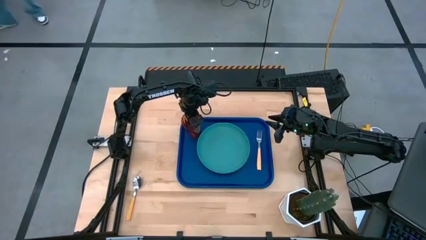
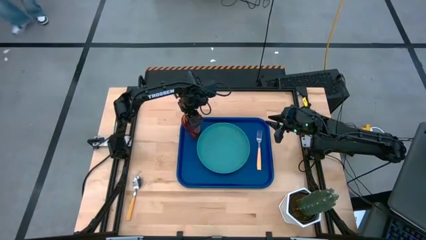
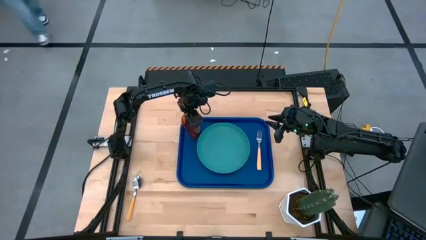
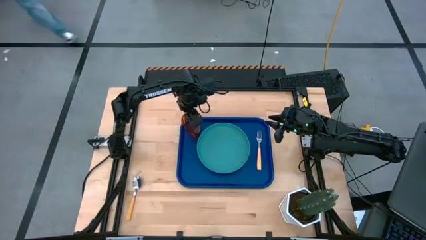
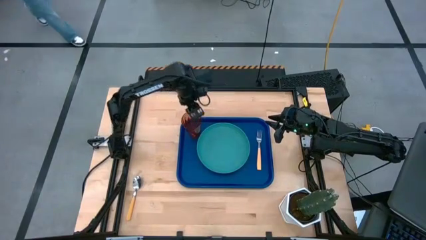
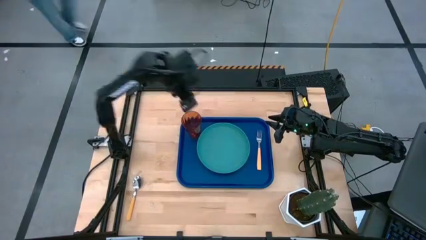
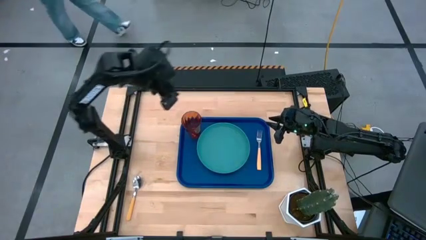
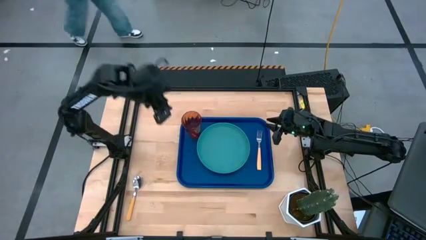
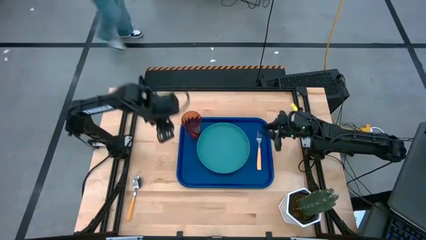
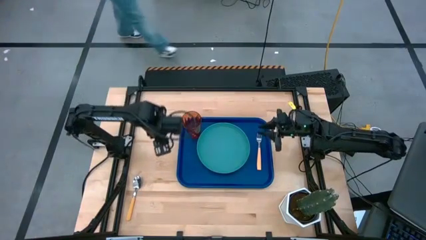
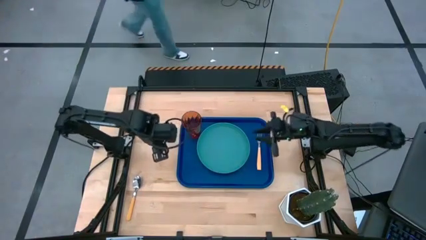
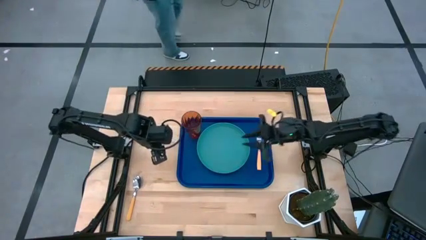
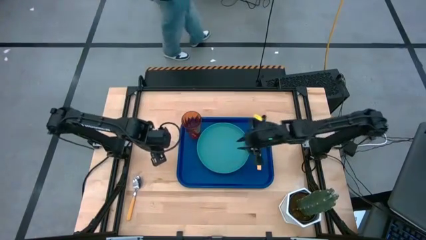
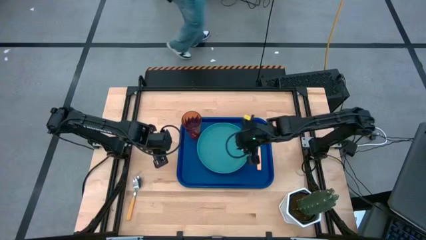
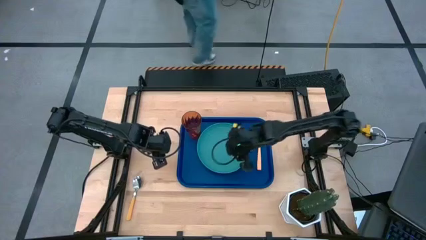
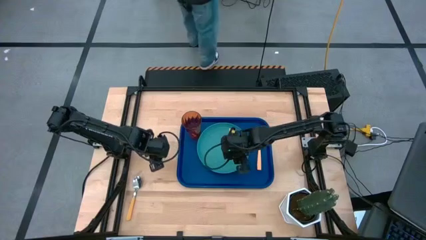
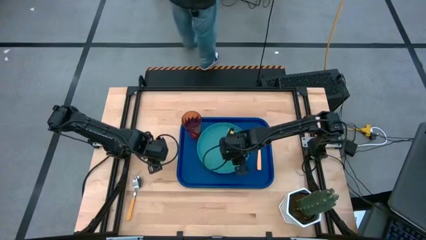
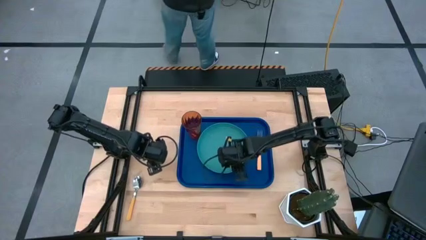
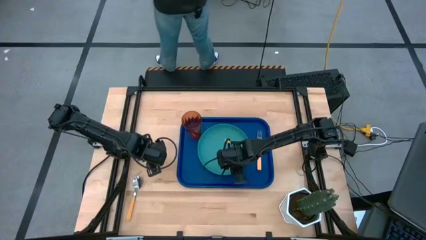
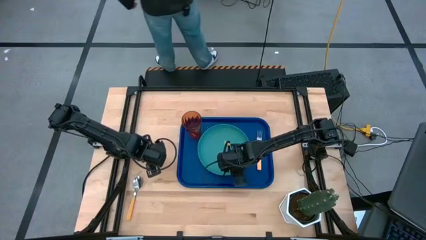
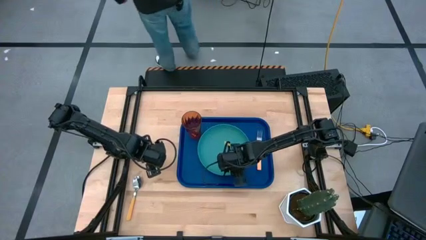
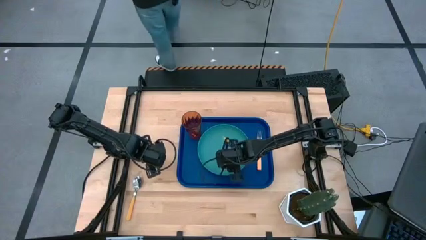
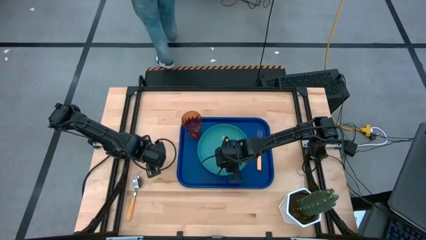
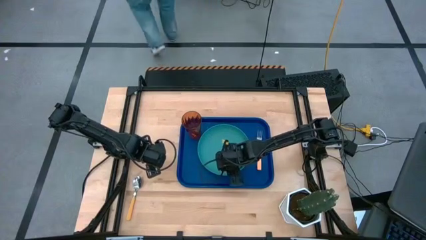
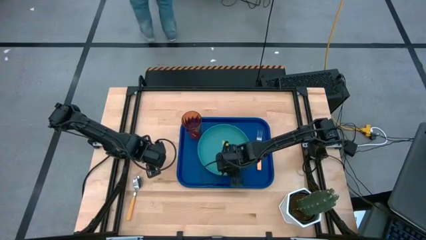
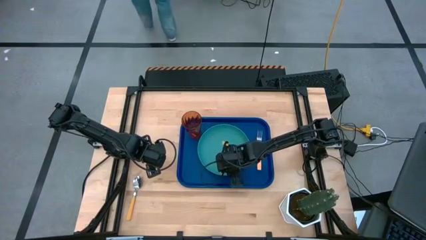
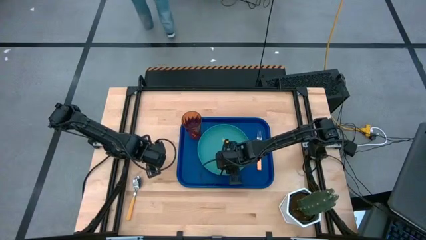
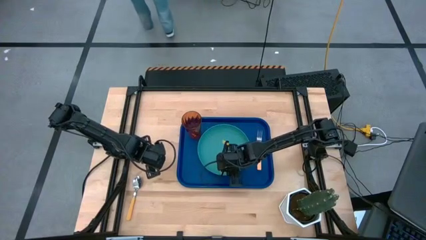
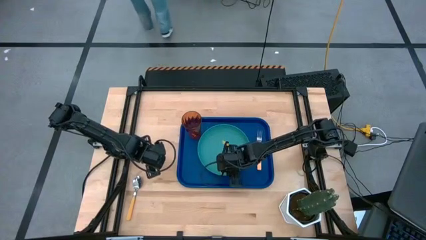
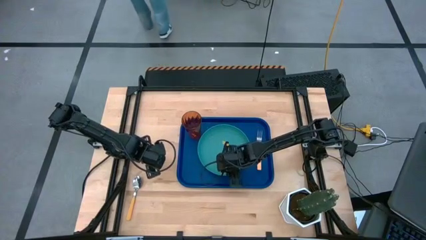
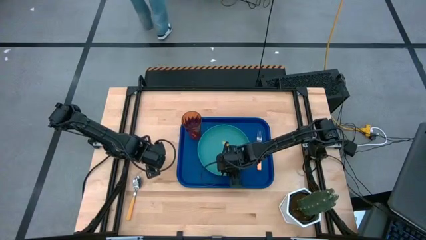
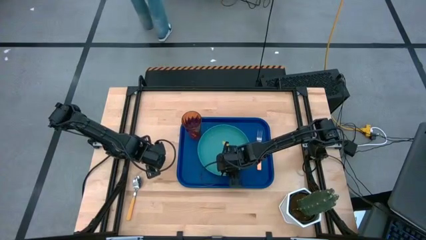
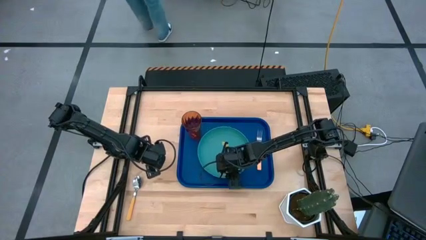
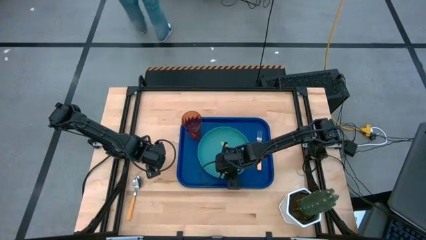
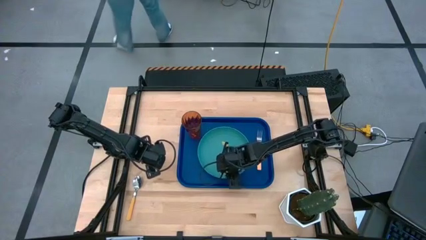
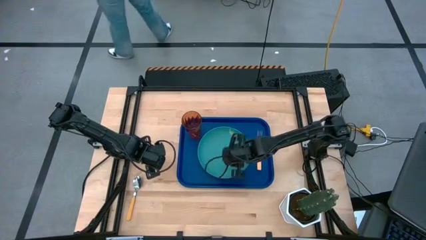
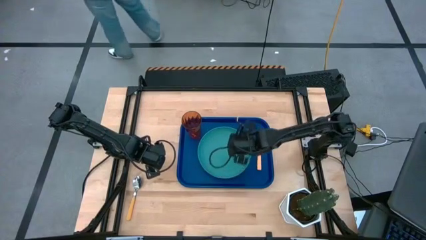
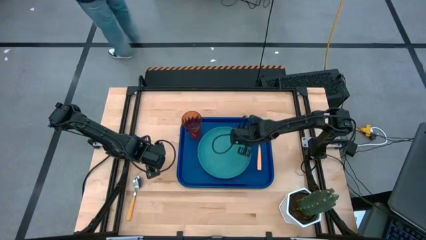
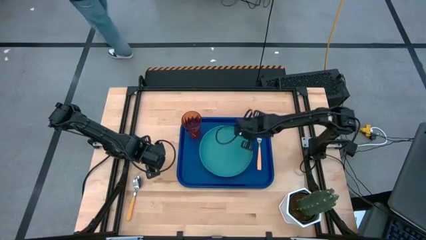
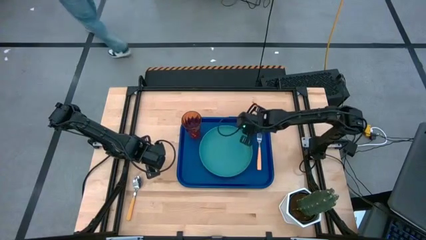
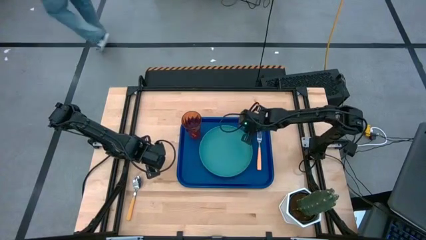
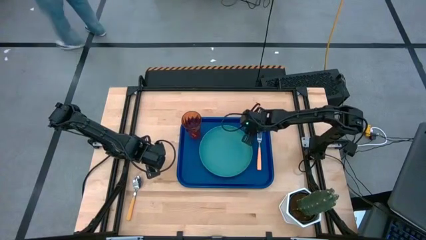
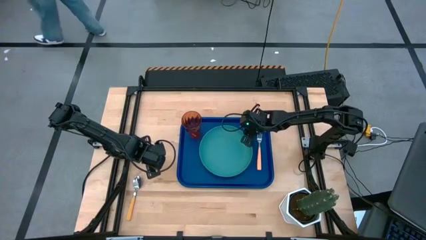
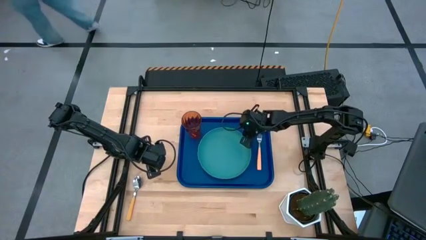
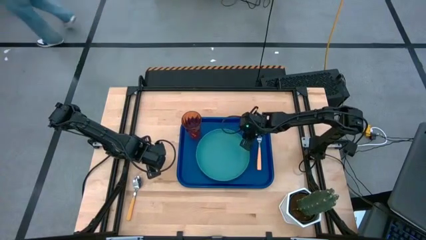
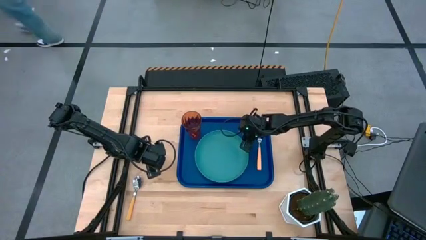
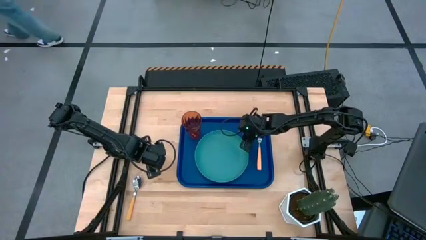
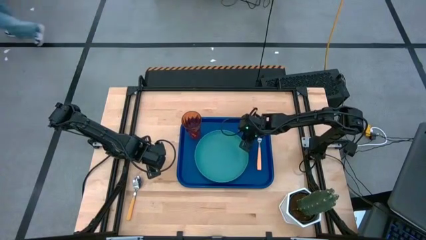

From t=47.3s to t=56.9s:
Task: Pick and place plate/cup/fork/spoon on tray
Adjust the green plate on the blue tray

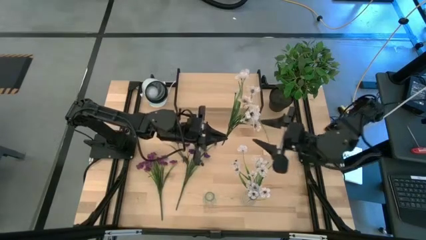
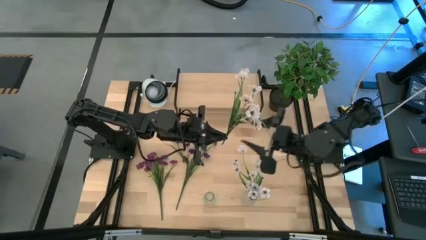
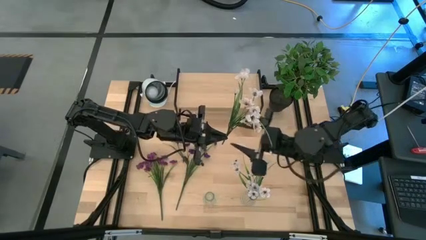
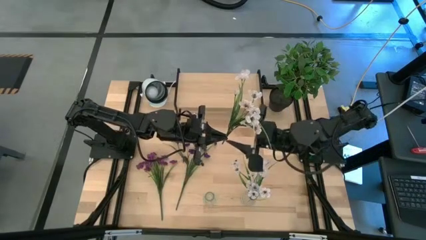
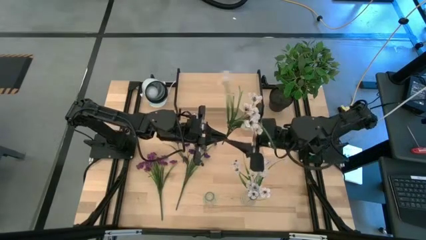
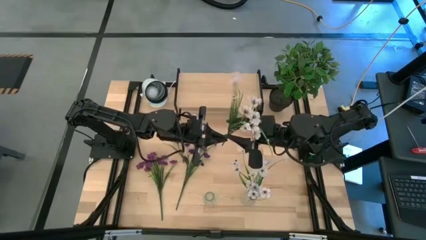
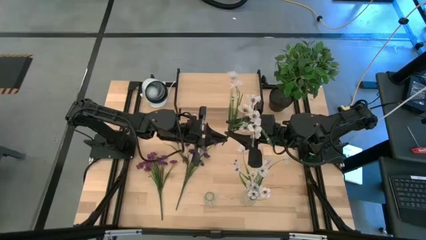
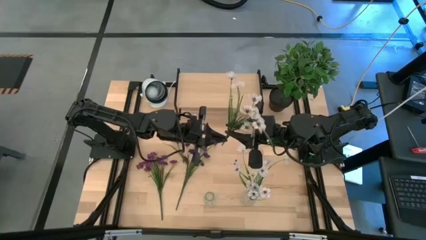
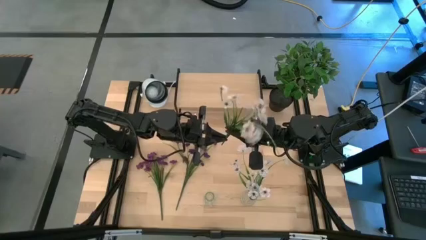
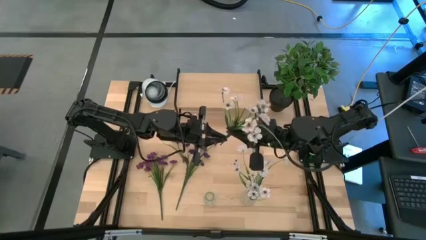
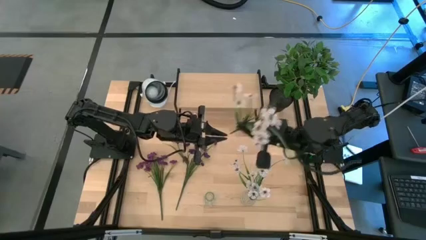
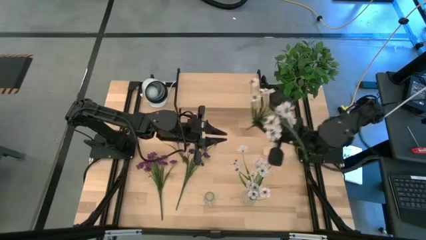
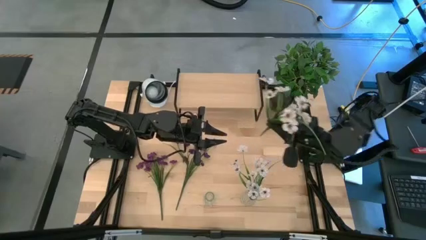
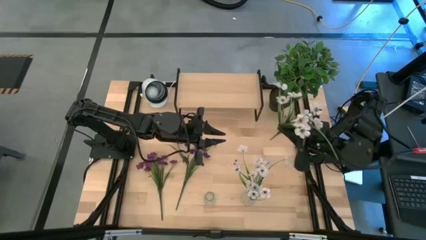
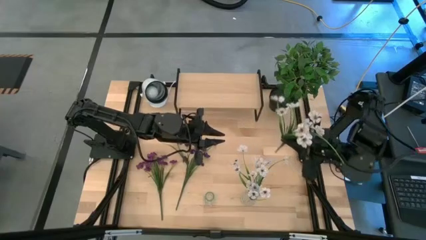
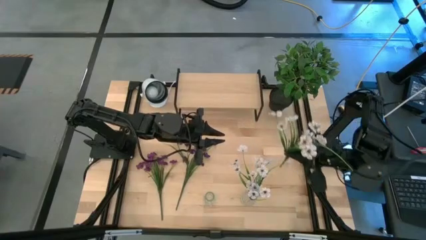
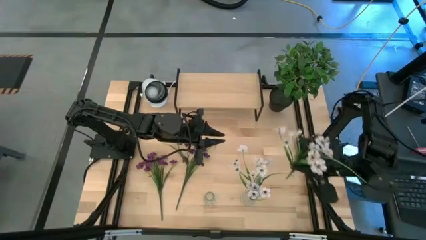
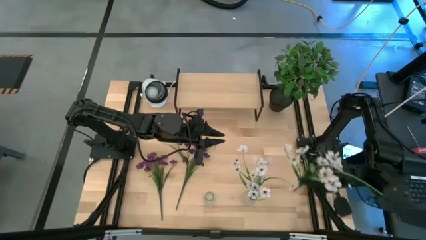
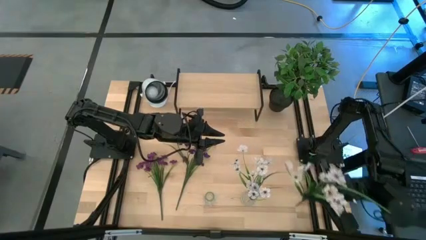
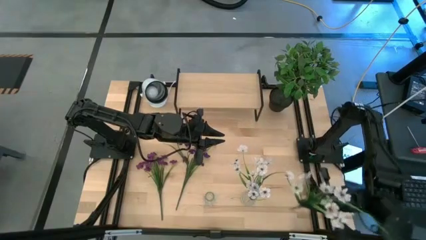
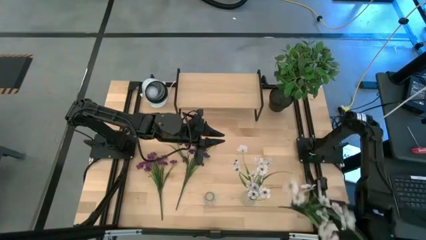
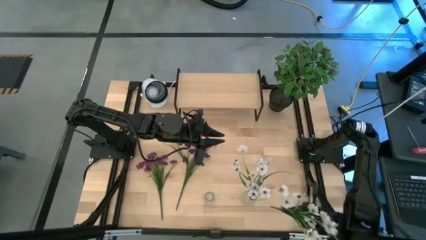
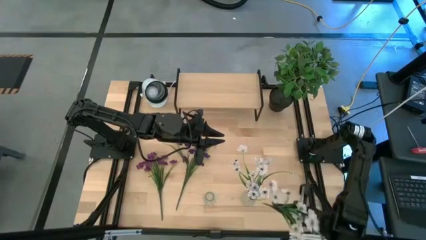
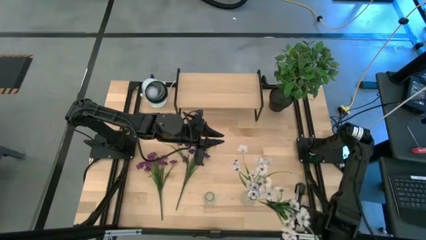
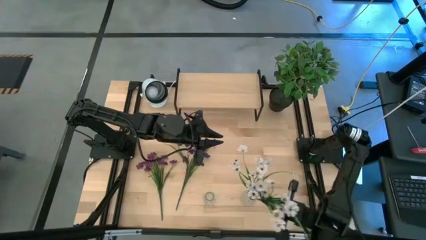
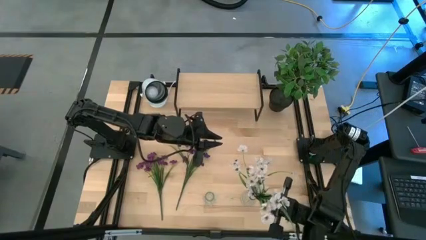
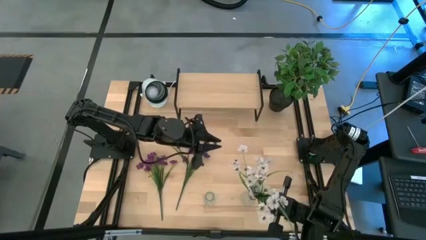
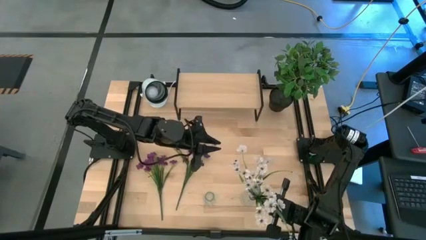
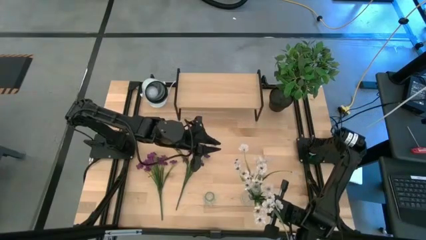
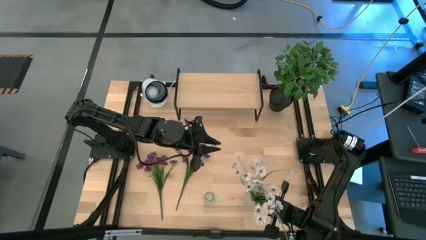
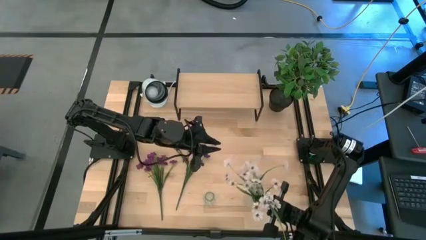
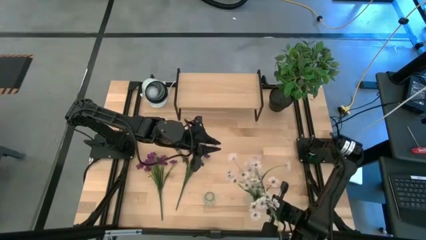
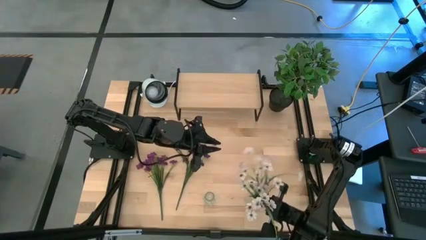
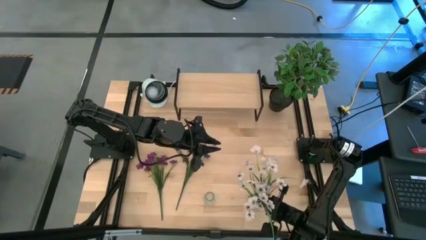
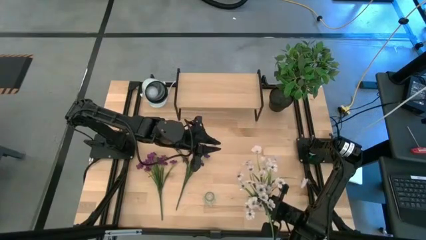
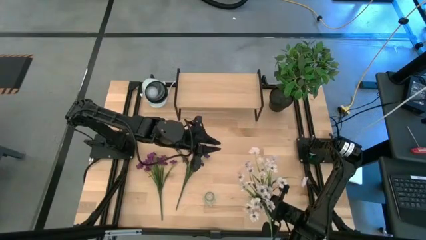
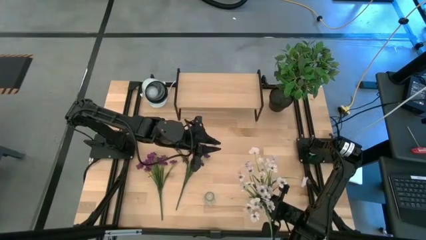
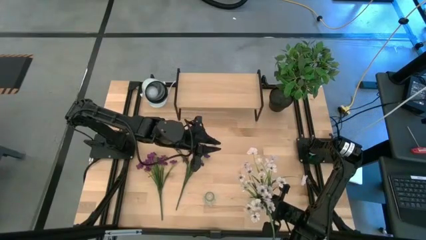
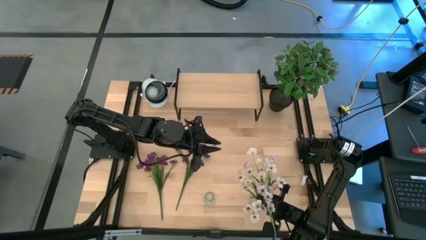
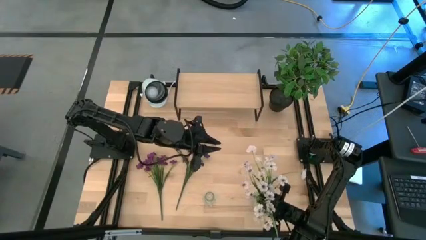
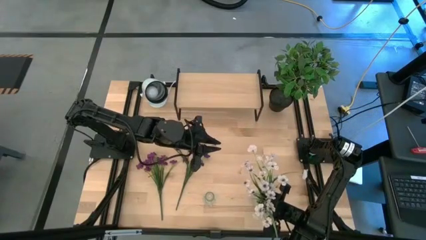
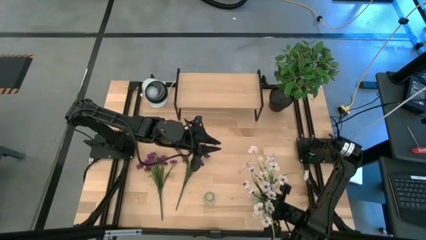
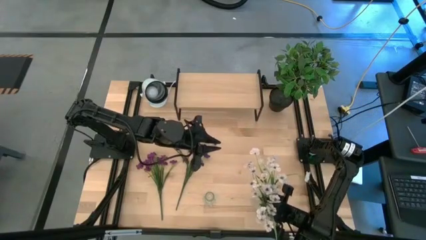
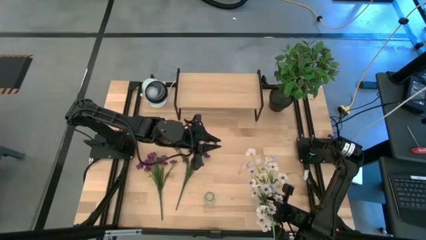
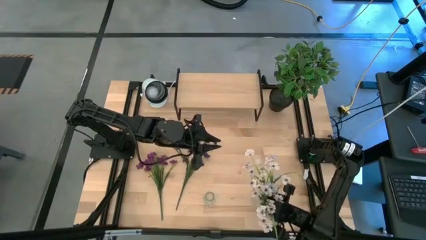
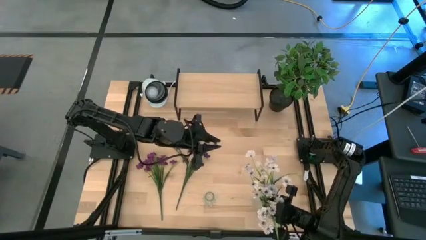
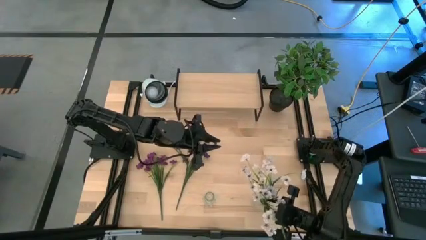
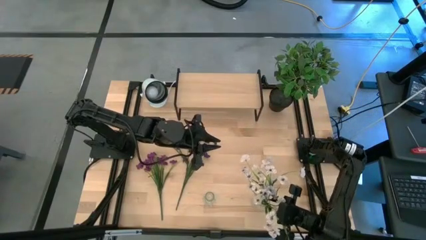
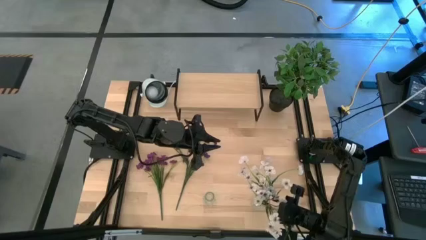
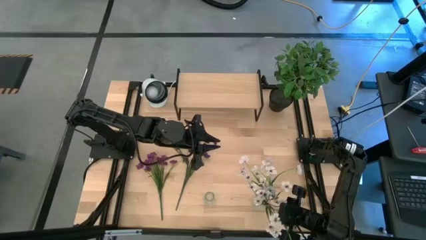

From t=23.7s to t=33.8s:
Task: Pick and place flowers into a vace then onto a shelf
Put the white flowers into the right transparent vase
